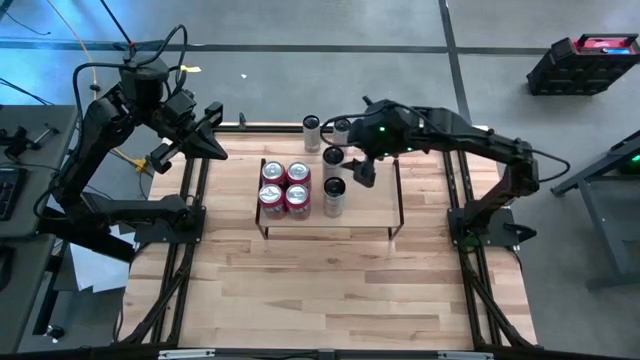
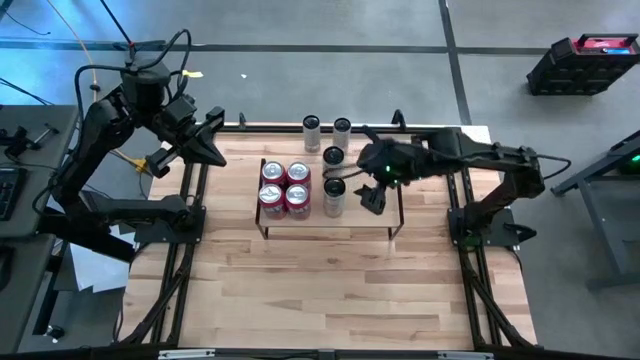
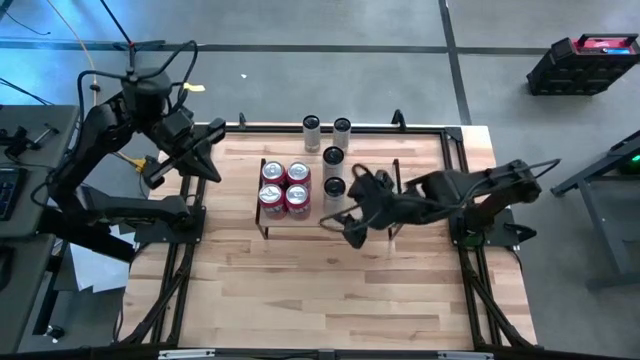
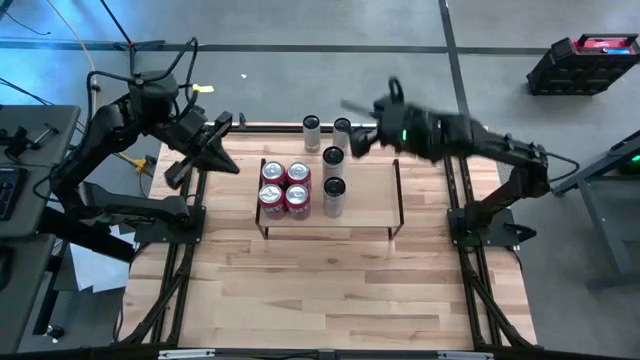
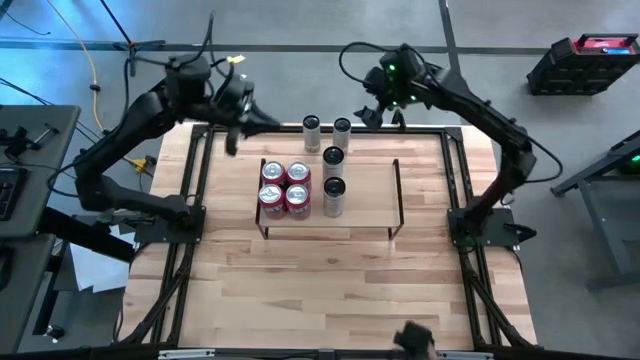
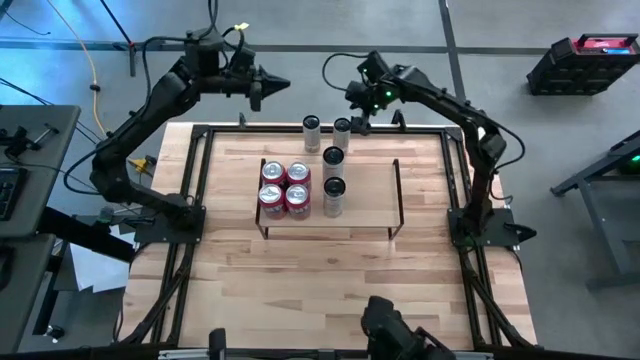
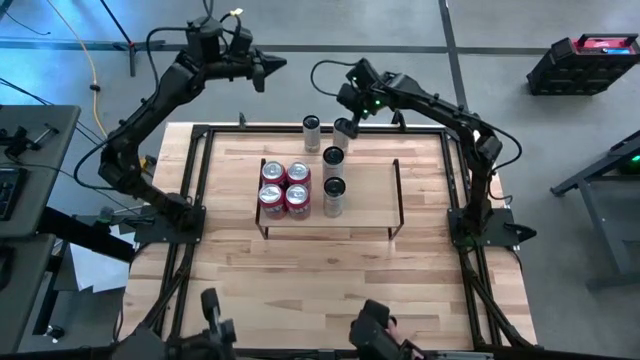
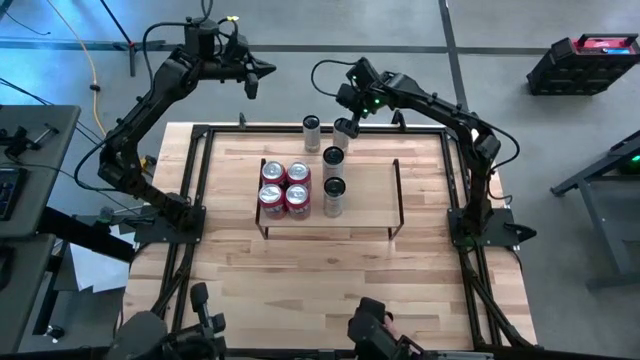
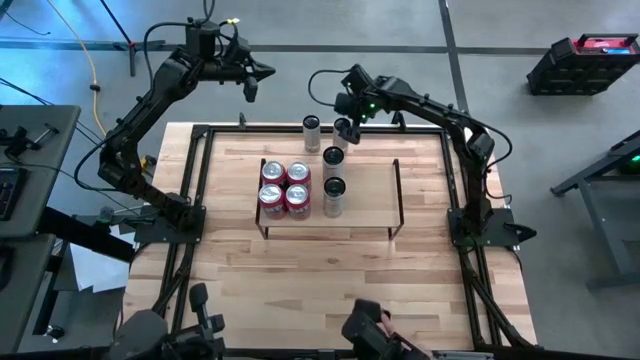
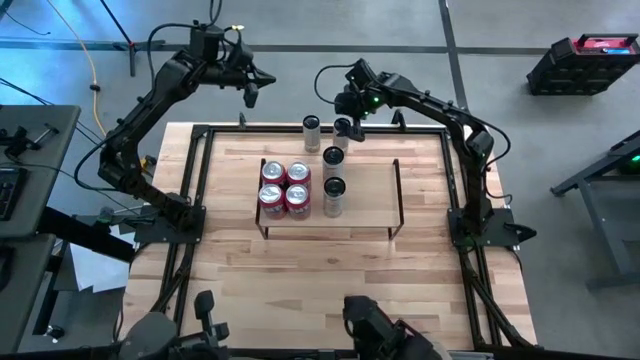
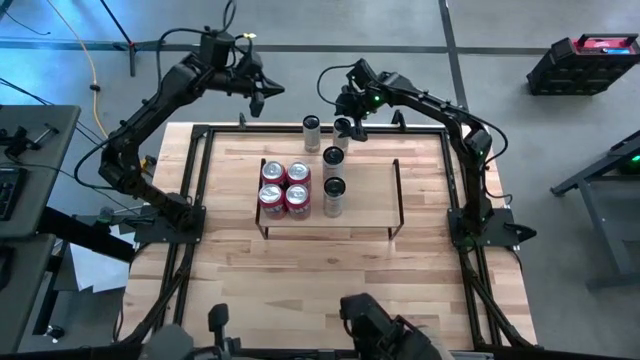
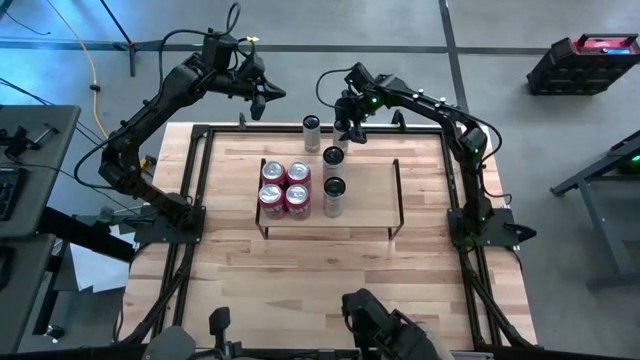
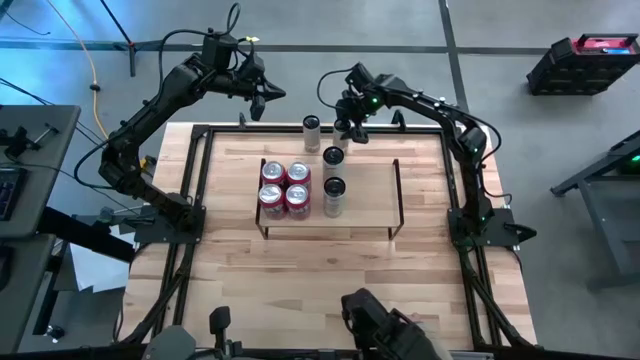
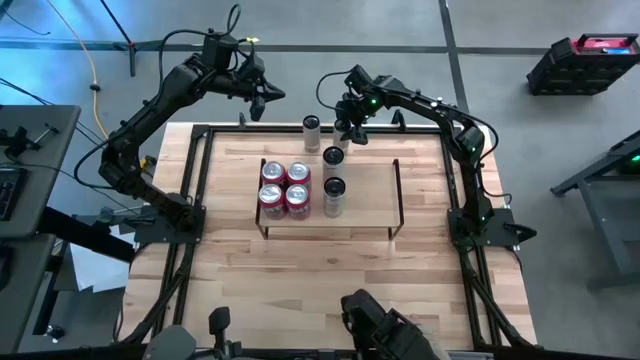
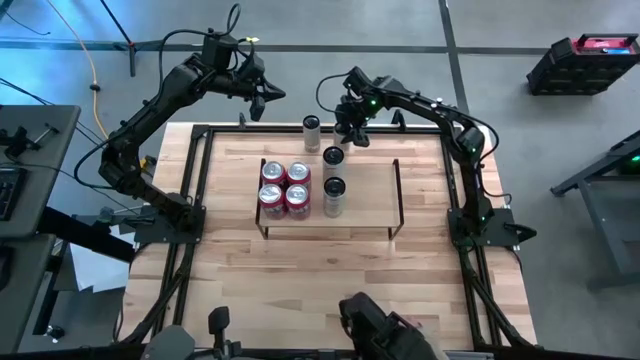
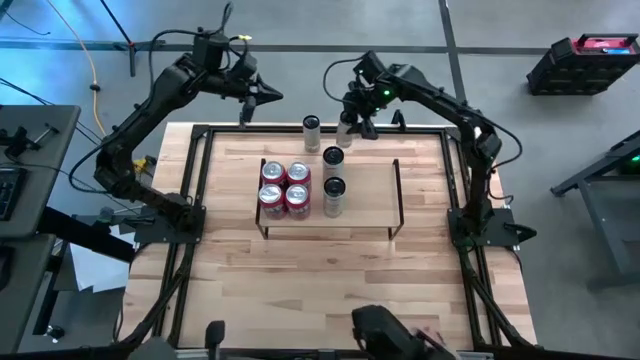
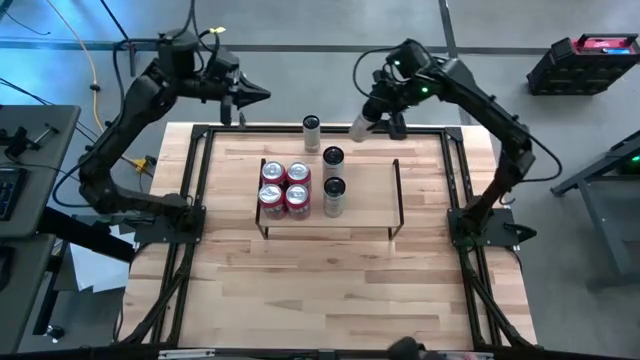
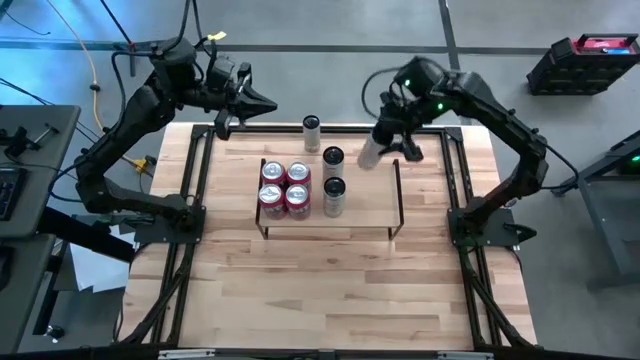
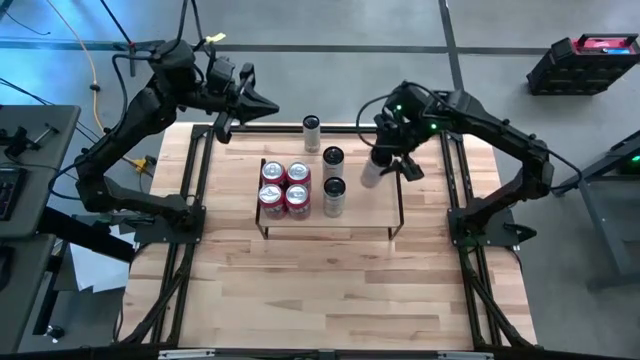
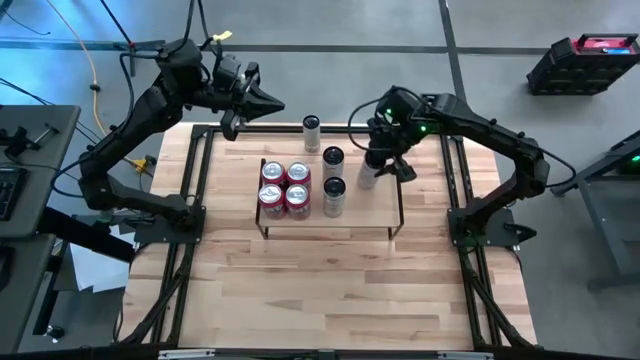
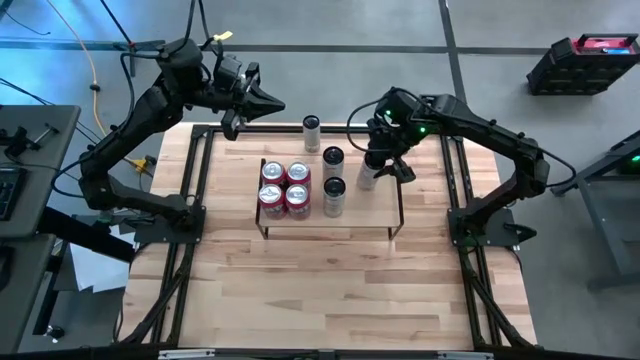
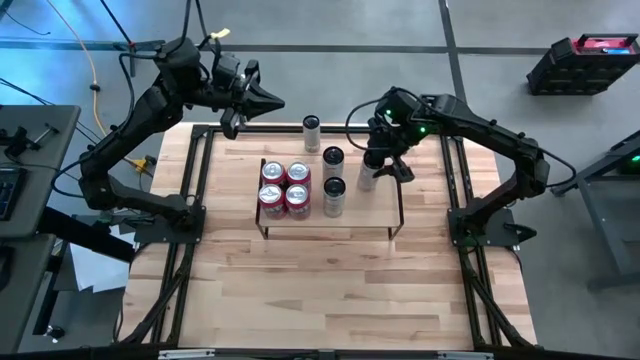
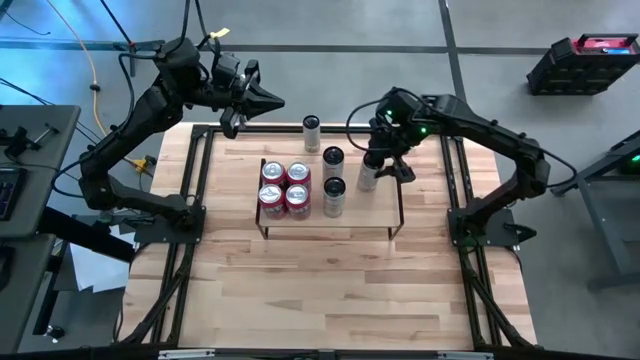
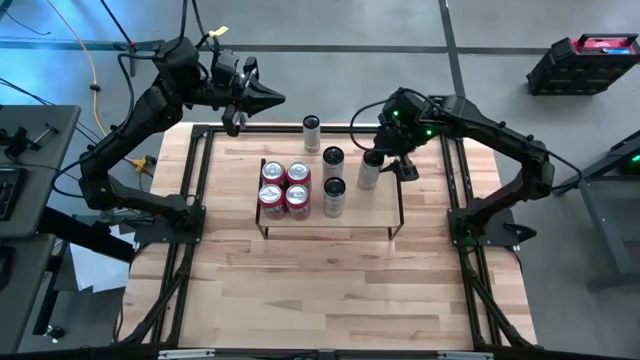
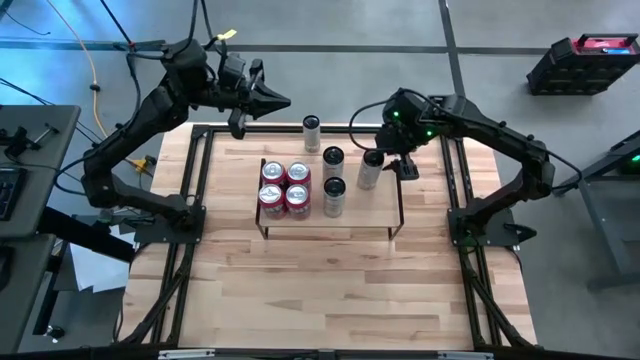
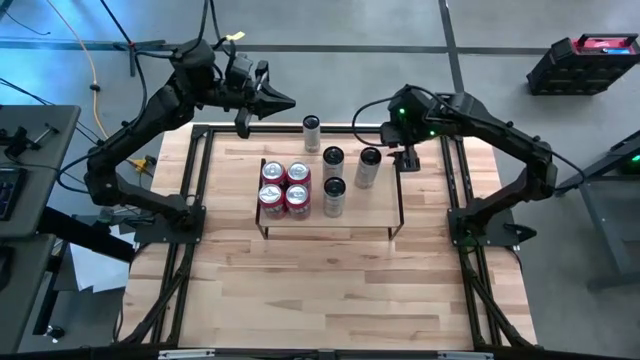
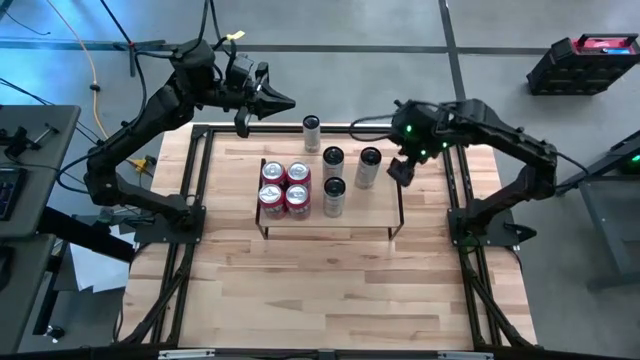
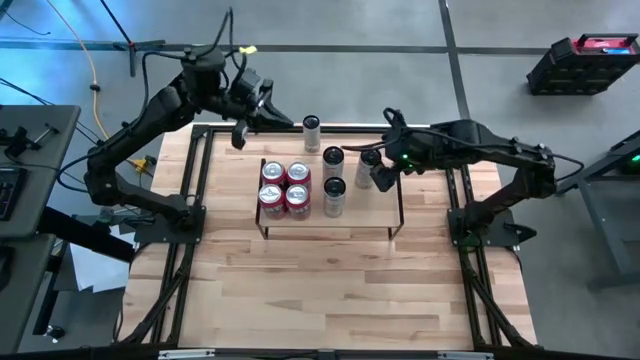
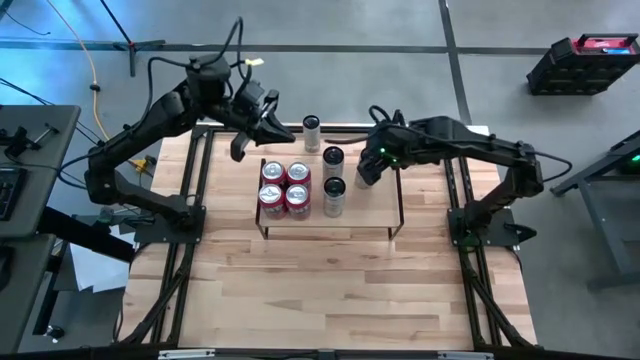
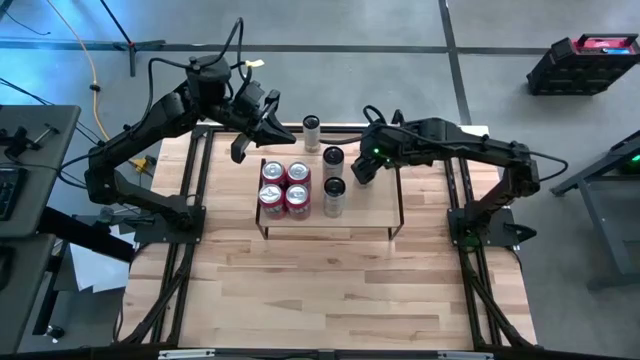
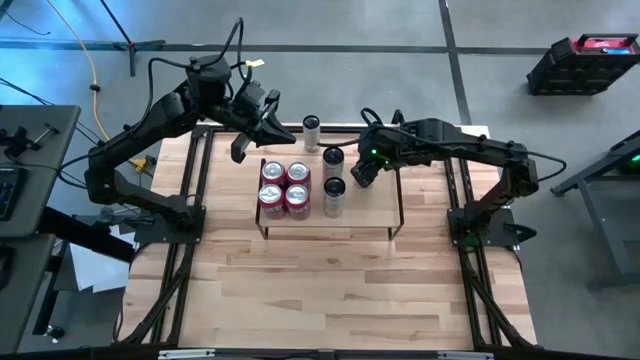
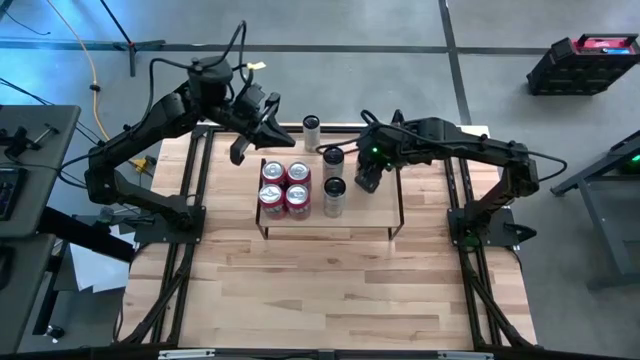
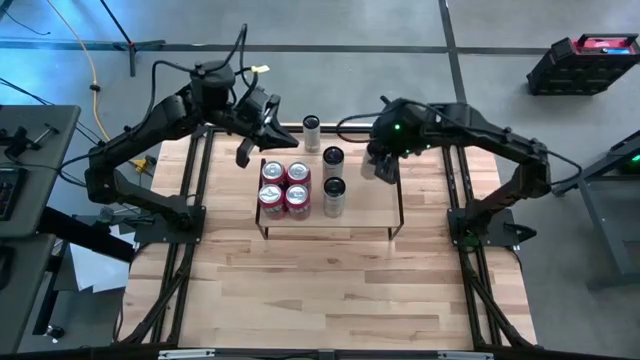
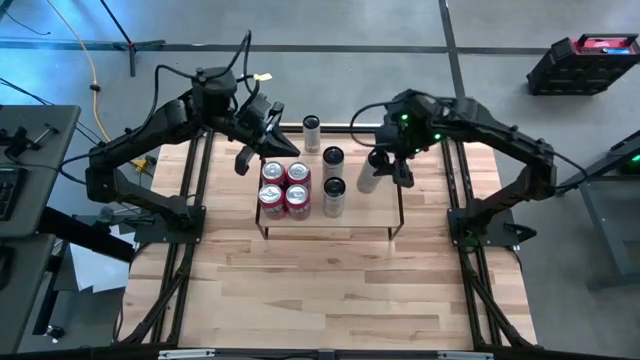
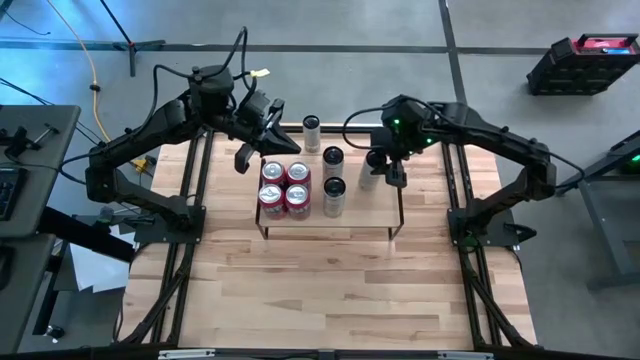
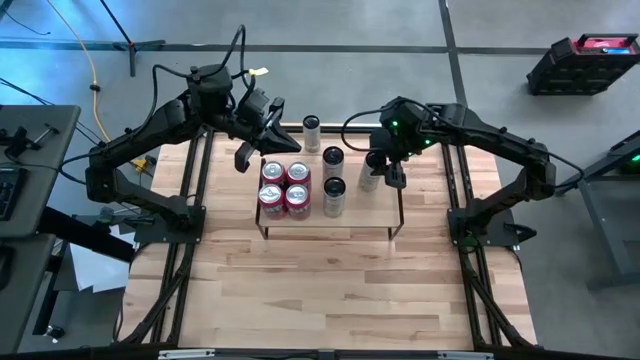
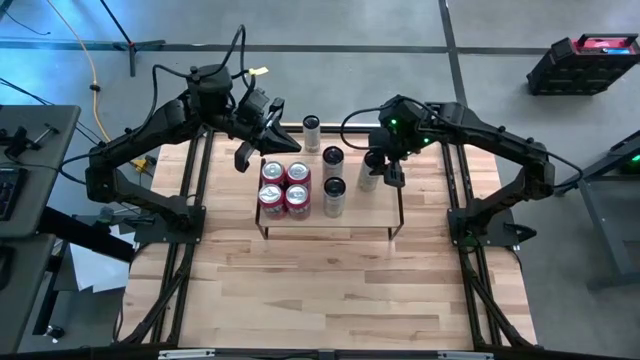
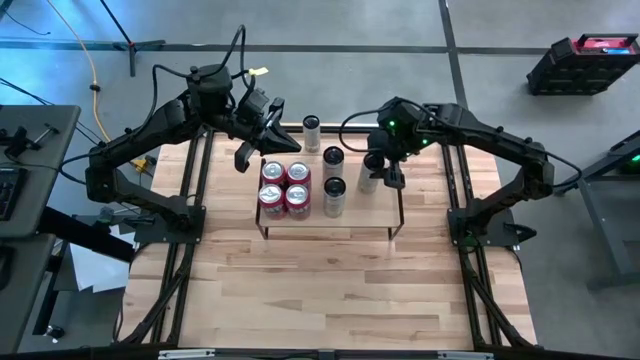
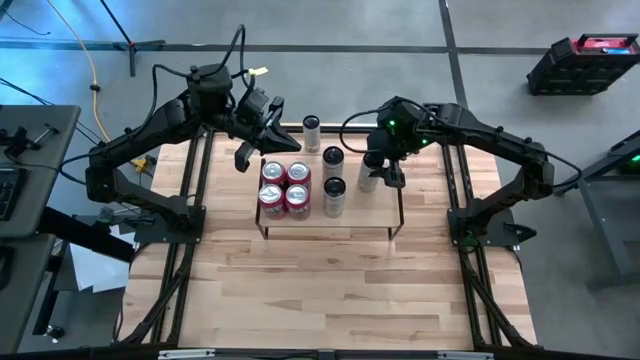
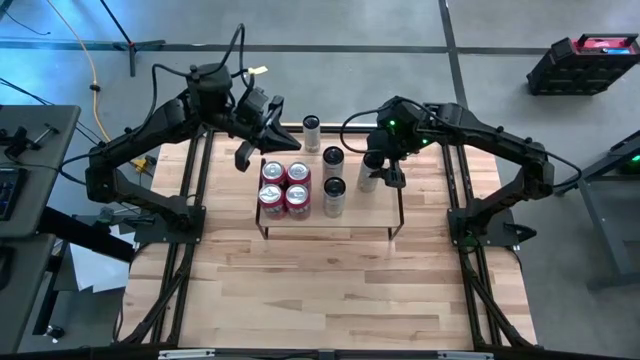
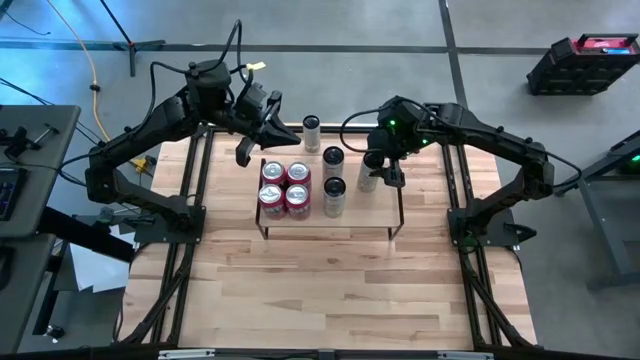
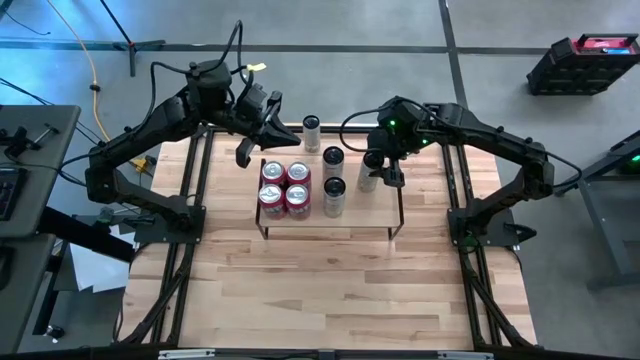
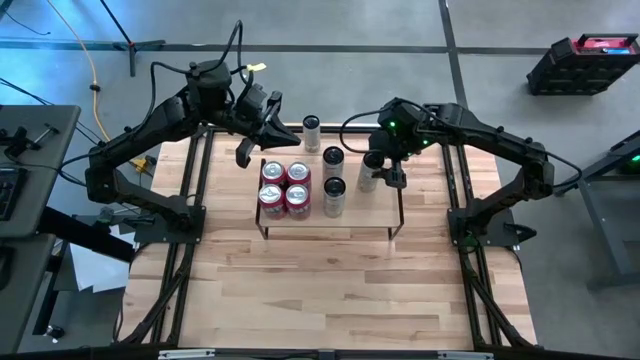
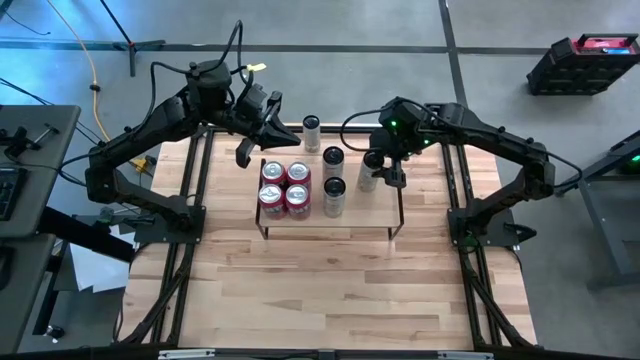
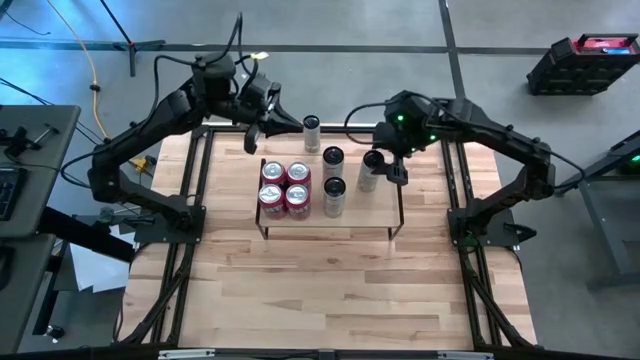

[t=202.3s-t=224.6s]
Task: Place canned beverage on shelf
Put the white yellow soda can on the shelf

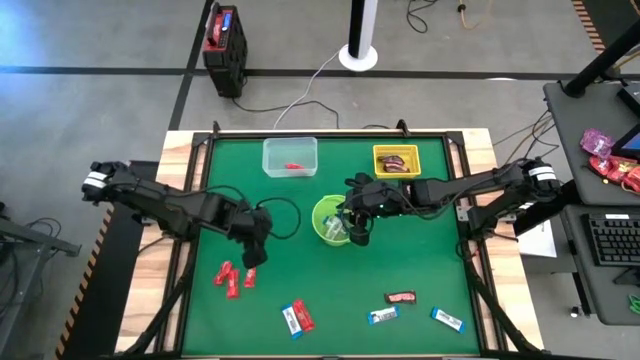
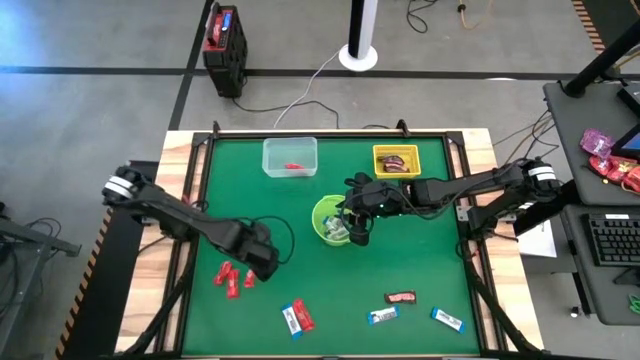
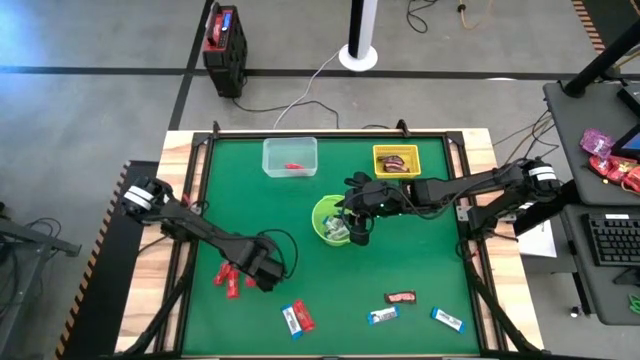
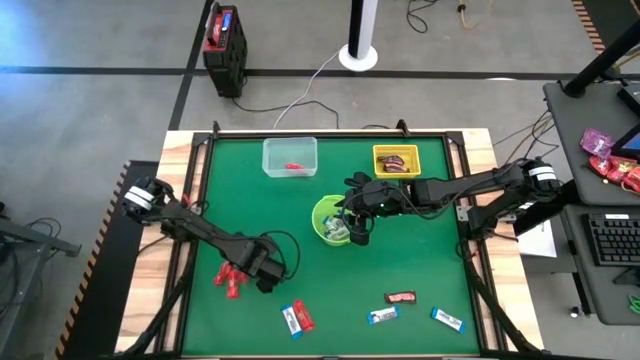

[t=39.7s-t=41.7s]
Task: Sort candy by brand, put in halloween buckets
Put the red chocolate into the transparent bin
